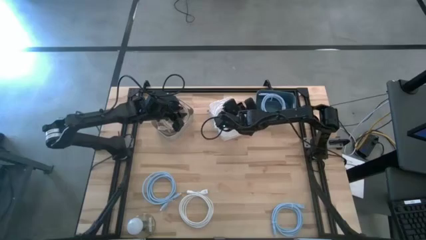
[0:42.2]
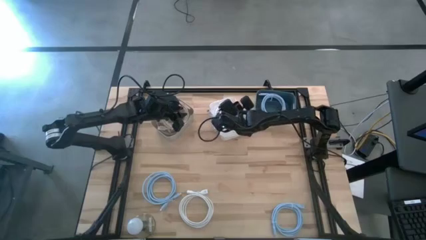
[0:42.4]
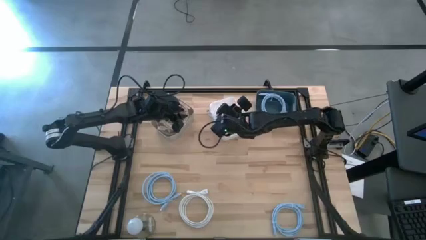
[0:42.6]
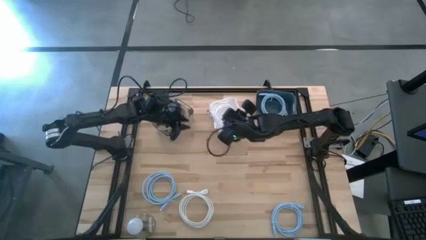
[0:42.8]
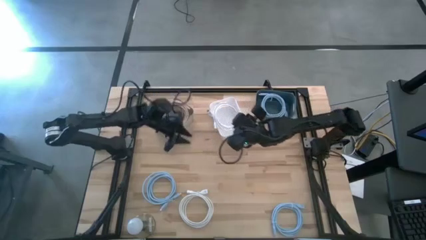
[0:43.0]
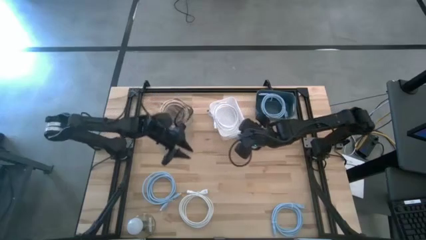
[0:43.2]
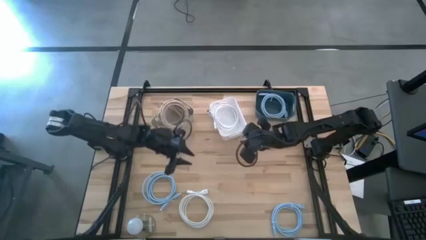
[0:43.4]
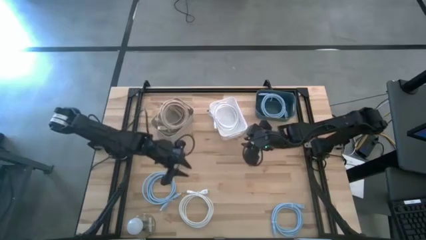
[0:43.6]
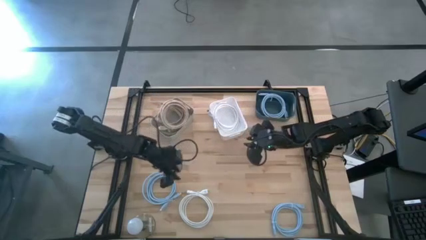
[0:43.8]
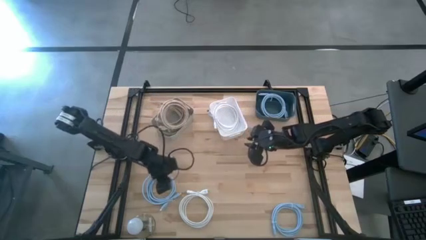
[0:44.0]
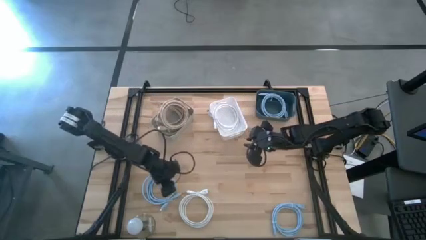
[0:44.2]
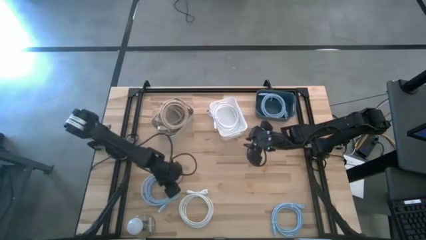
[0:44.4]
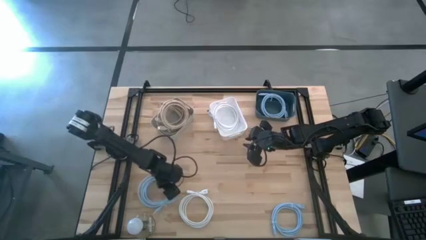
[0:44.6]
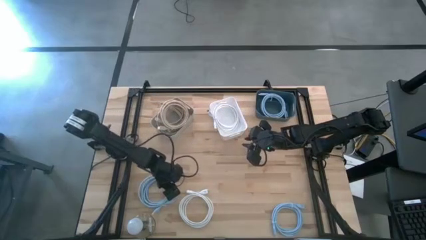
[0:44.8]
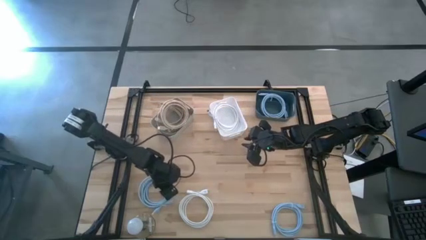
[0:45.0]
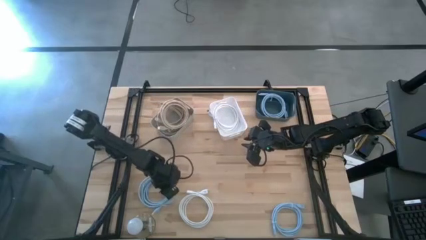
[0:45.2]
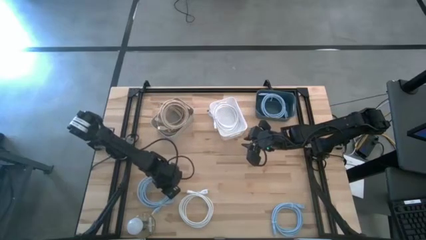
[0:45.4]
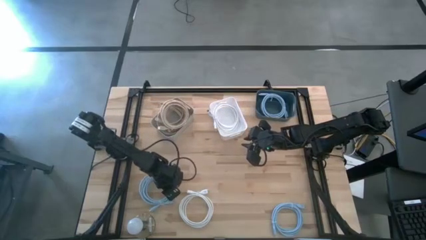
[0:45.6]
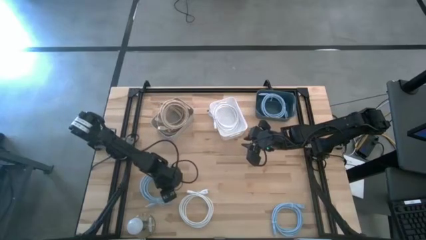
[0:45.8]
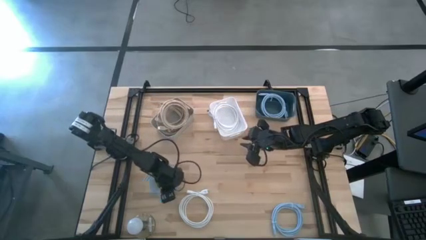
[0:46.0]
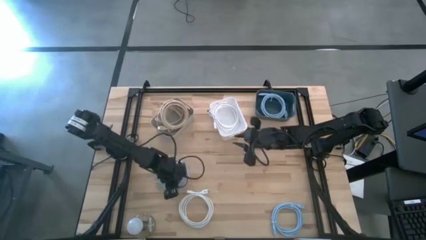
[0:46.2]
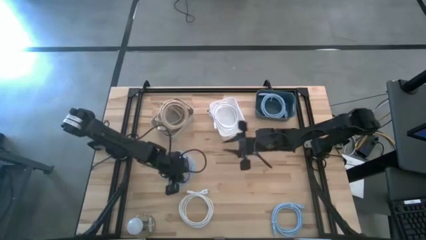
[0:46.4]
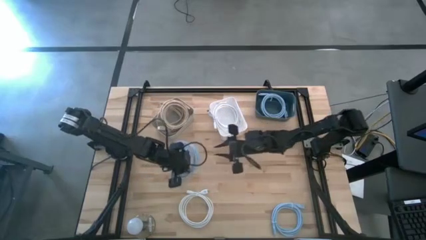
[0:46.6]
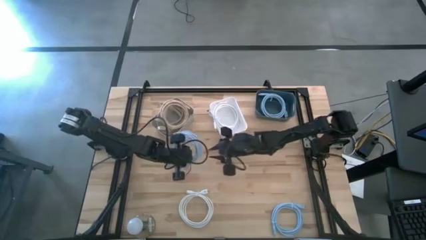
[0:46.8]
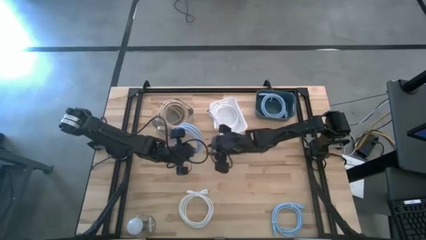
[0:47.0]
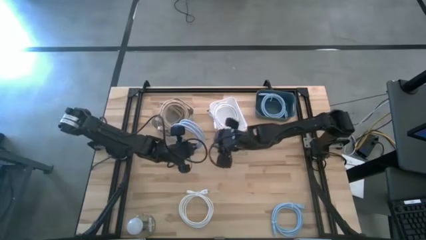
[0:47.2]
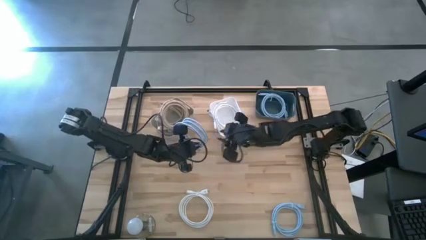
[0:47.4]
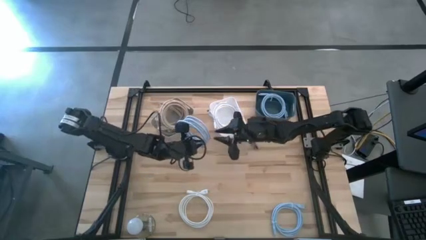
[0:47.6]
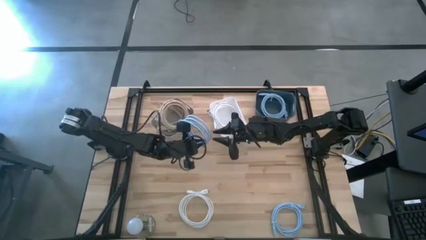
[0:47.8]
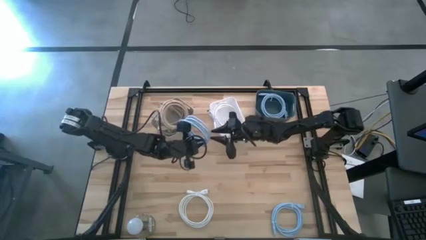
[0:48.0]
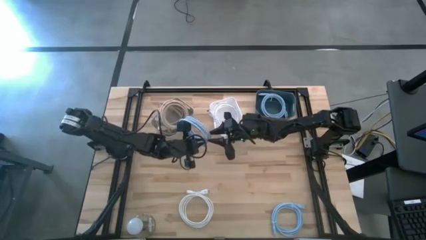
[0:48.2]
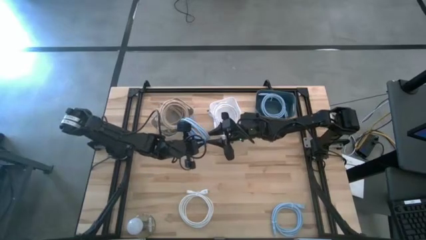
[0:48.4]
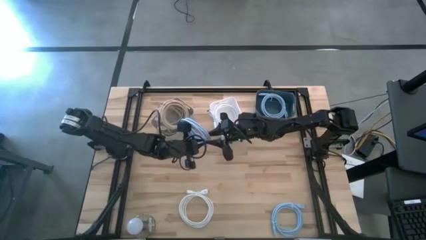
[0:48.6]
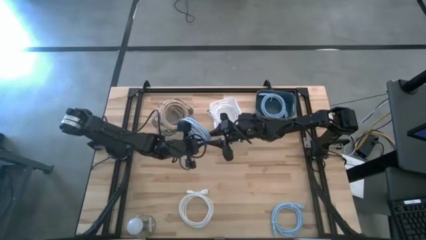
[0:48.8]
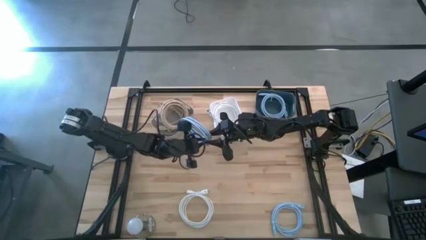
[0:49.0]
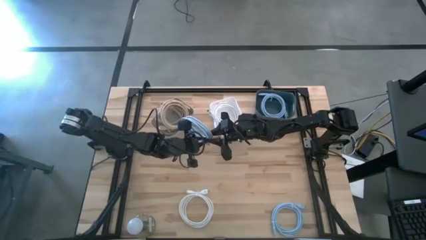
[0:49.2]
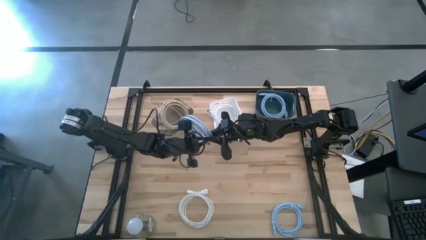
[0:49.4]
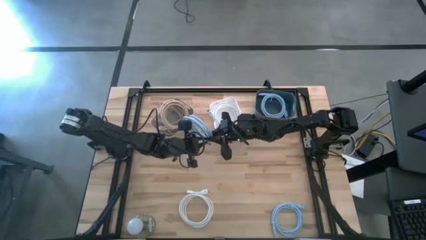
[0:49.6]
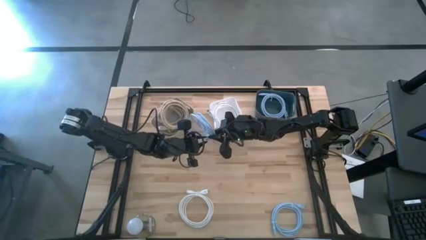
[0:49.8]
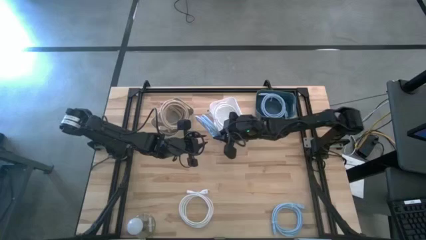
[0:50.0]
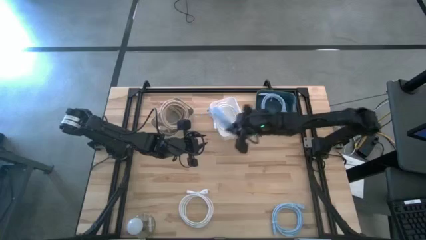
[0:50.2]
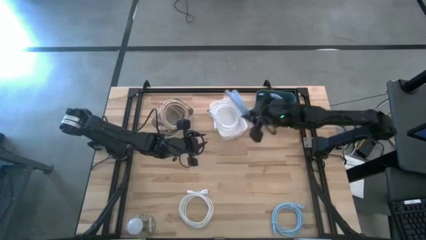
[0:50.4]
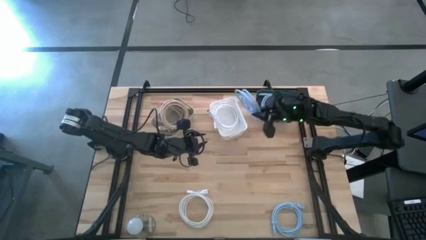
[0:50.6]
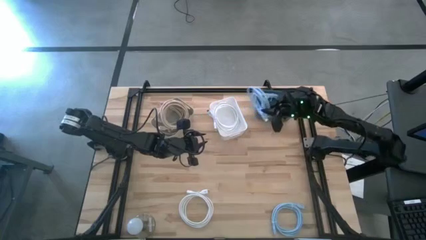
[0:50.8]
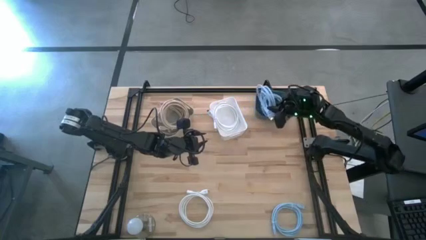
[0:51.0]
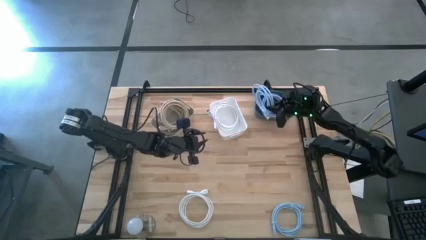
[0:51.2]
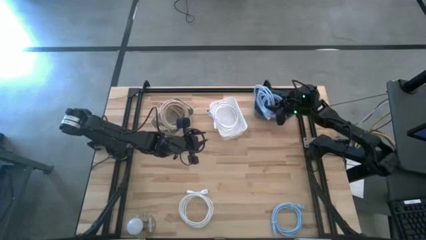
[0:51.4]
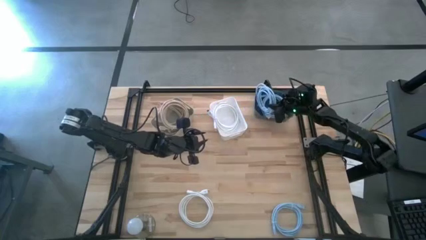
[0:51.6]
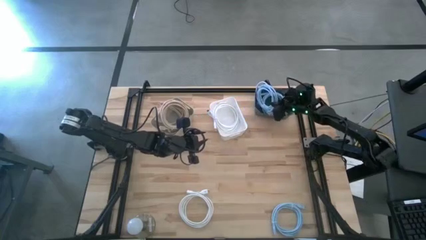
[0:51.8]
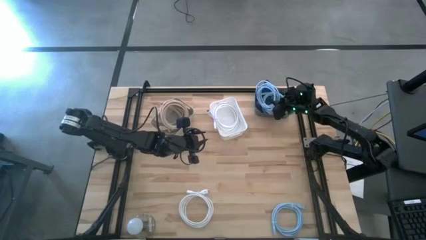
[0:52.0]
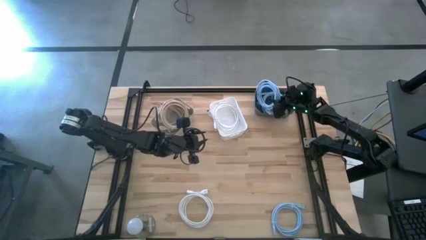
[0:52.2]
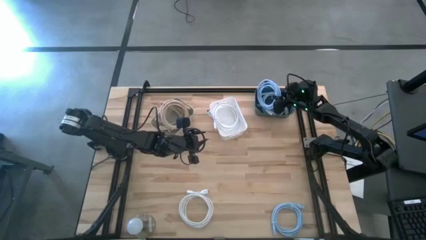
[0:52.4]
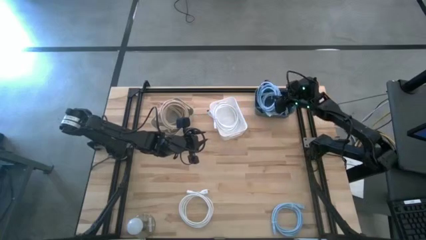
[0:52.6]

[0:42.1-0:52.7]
Task: Sort HDMI cables
Put the top light blue hdmi cable into the blue bin

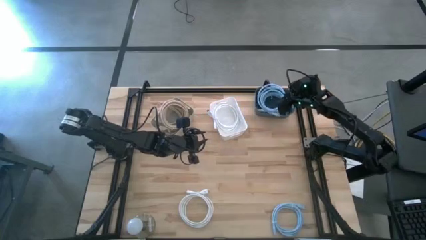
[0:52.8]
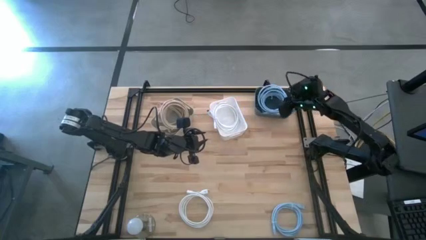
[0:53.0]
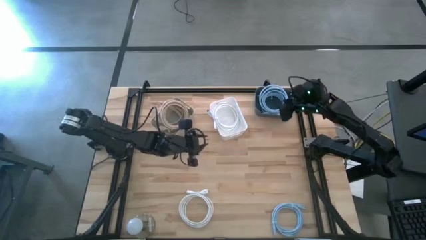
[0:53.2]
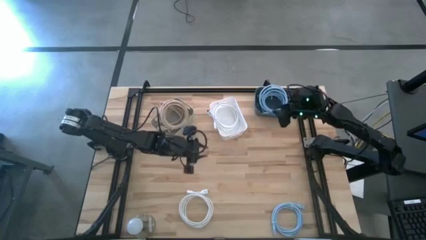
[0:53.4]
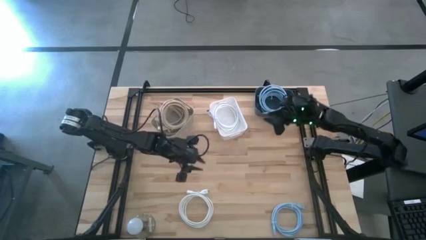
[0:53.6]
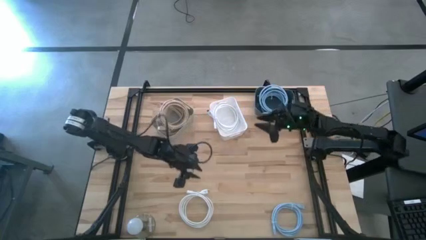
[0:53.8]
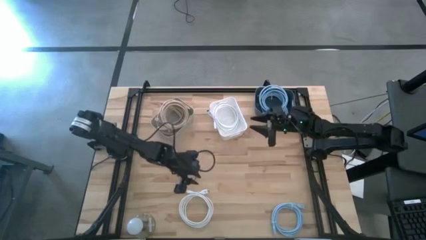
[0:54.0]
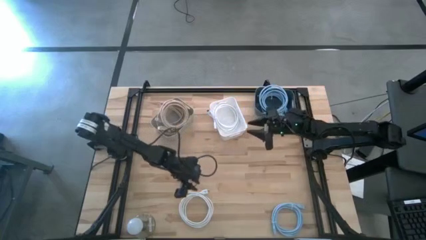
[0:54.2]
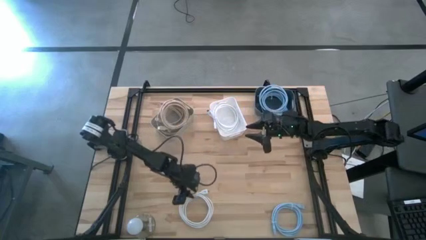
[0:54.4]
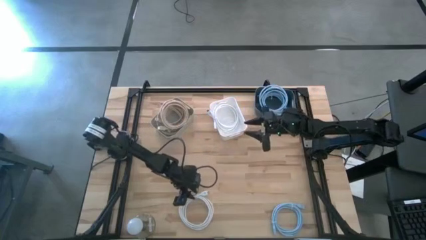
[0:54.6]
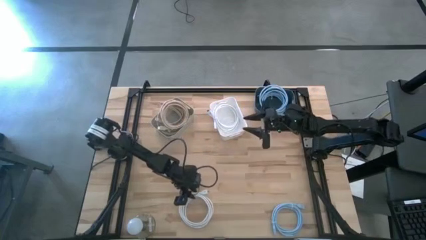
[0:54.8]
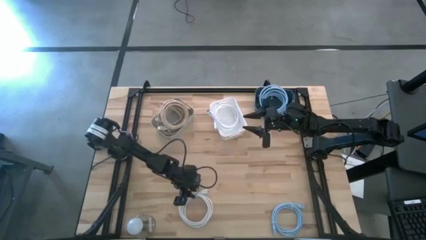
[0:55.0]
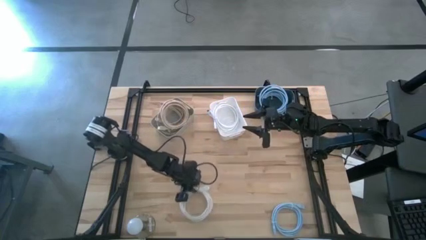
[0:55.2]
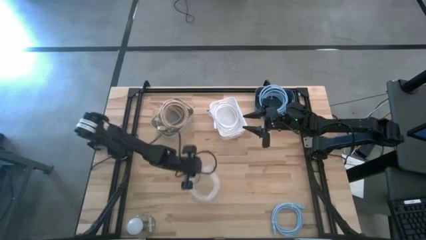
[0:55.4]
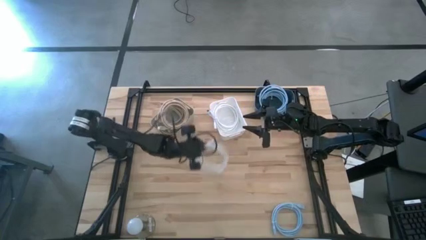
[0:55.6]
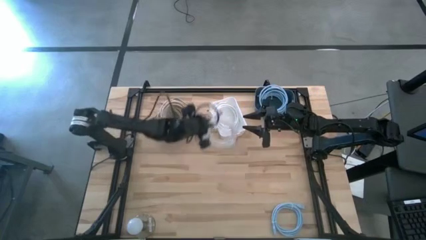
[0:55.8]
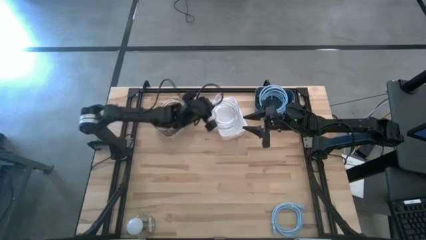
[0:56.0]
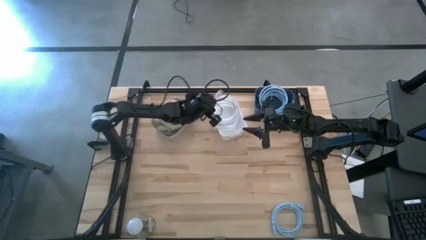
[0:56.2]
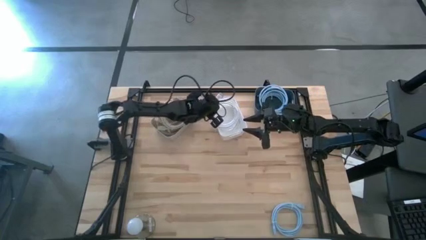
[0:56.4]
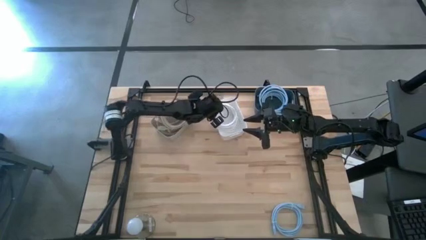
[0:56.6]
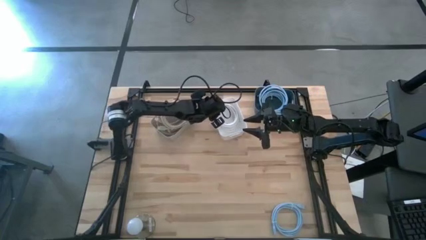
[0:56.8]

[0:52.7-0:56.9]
Put the white hdmi cable into the white bin

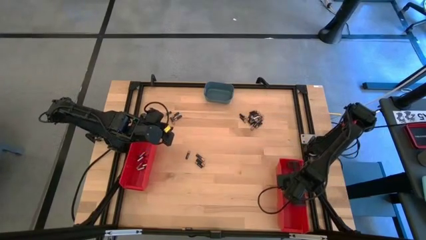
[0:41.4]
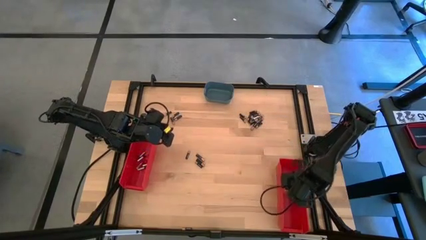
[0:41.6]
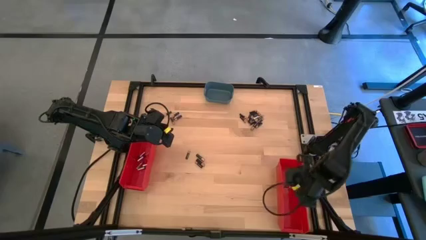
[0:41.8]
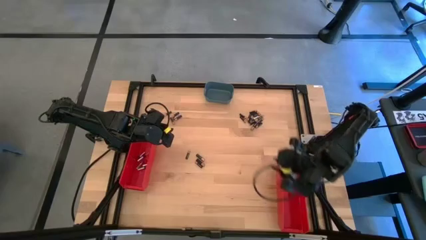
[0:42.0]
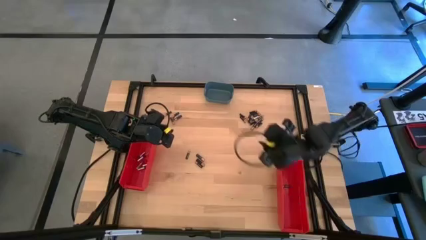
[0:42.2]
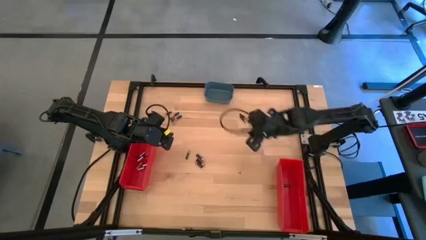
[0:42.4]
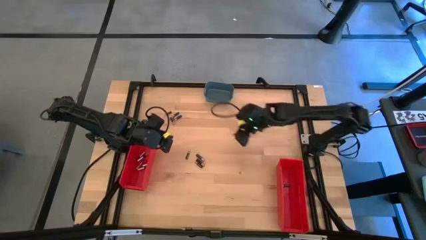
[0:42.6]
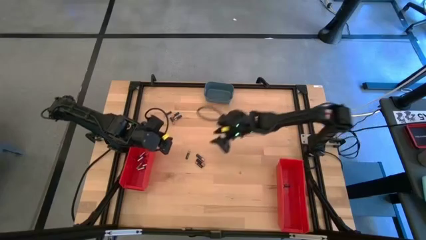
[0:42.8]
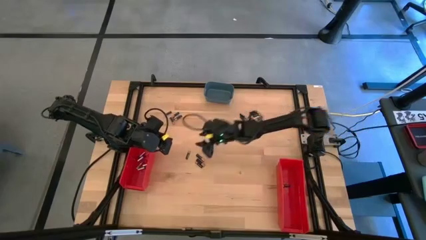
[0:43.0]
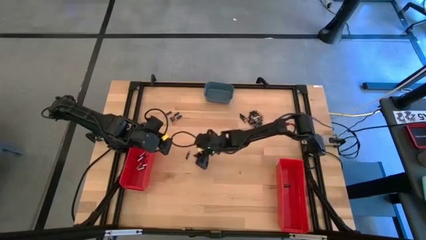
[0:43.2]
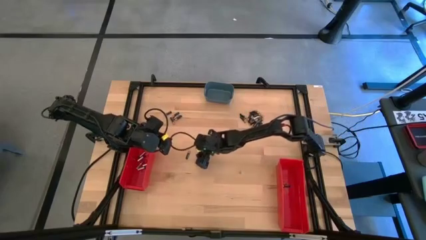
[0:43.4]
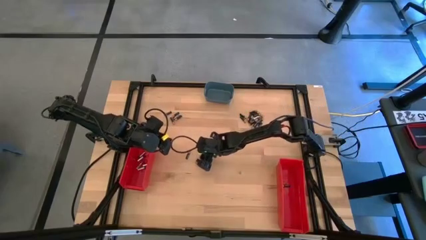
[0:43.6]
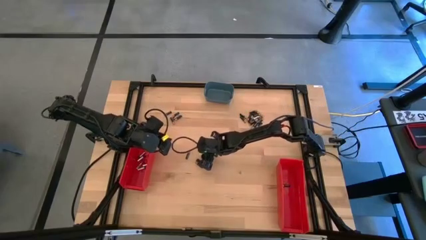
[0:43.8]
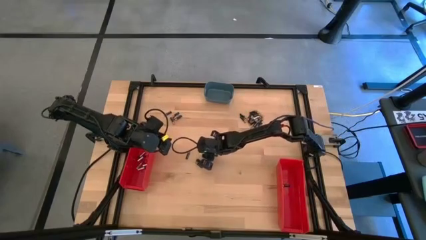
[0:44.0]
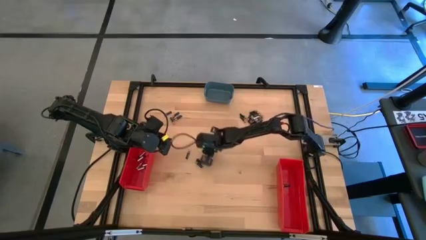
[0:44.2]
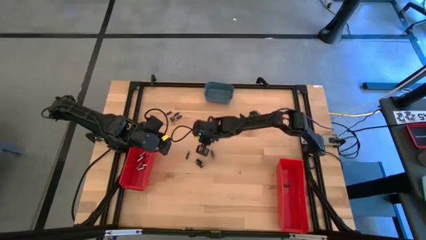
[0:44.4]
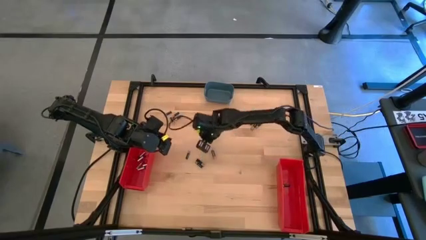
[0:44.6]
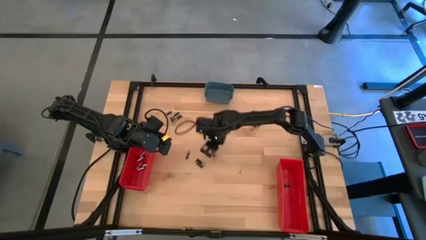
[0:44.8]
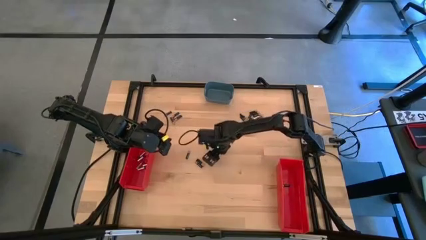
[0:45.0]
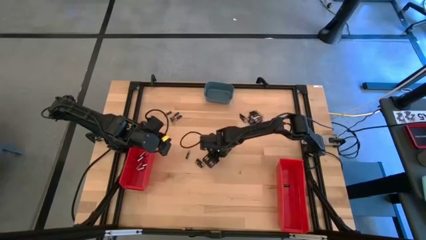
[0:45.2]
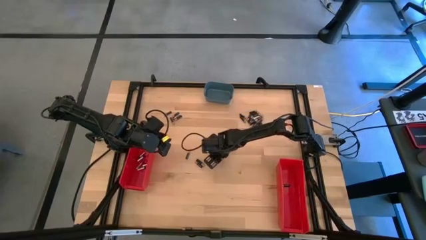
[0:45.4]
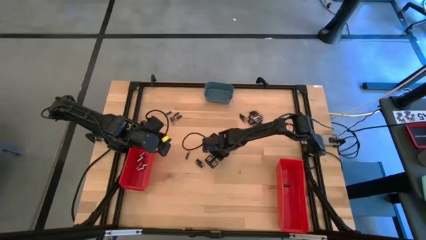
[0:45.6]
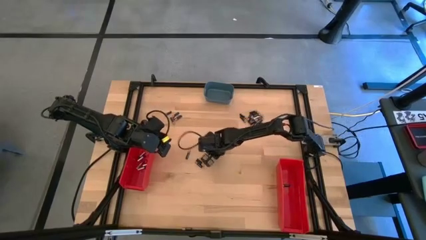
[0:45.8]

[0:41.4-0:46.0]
Task: Sort batteries
Put the big brown battery into the blue bin
